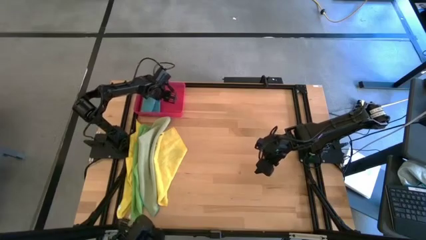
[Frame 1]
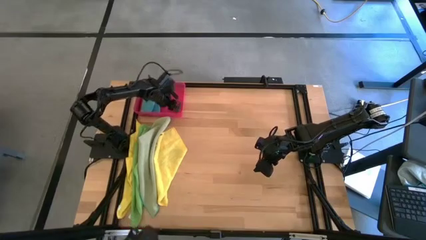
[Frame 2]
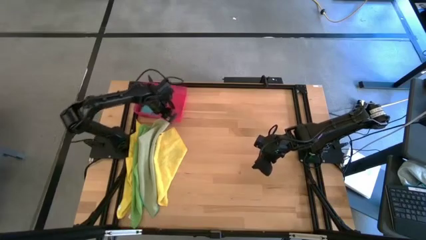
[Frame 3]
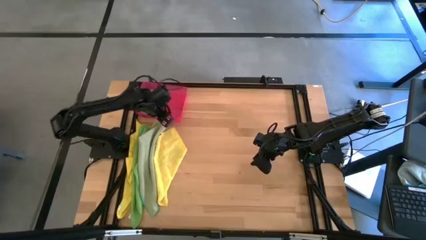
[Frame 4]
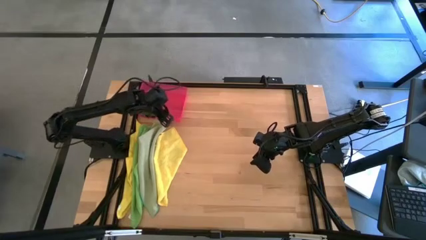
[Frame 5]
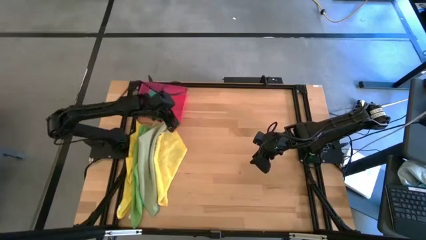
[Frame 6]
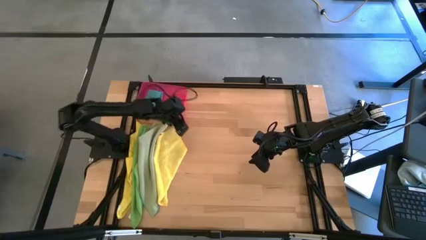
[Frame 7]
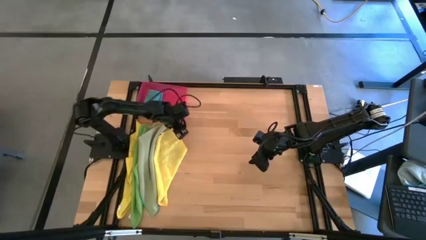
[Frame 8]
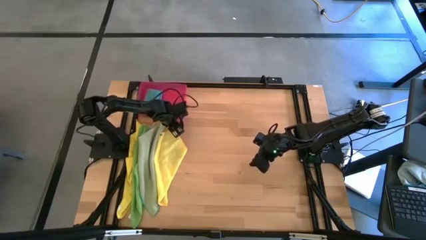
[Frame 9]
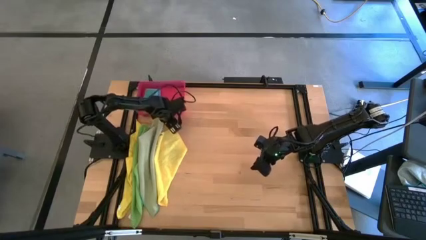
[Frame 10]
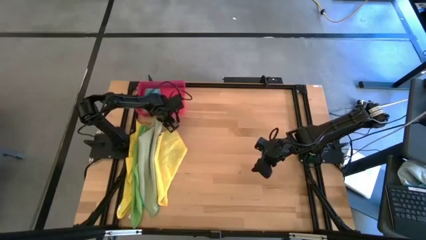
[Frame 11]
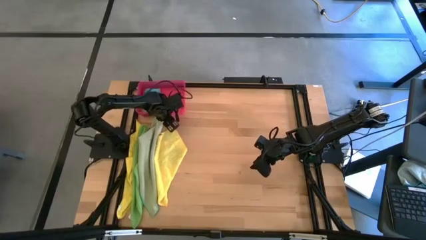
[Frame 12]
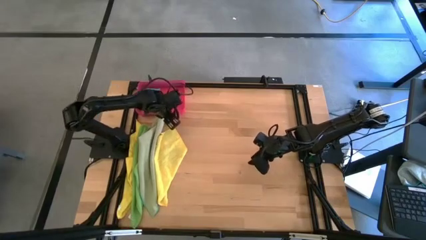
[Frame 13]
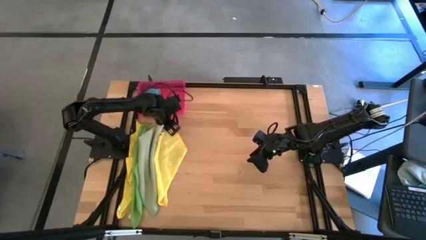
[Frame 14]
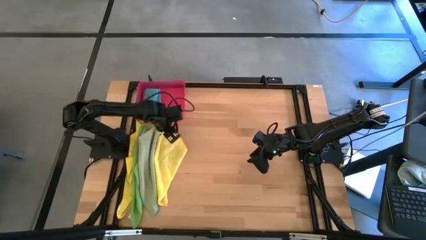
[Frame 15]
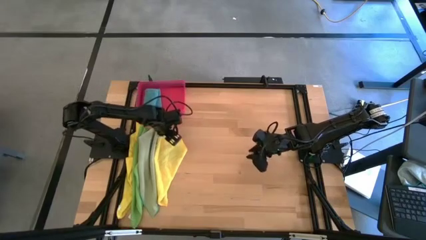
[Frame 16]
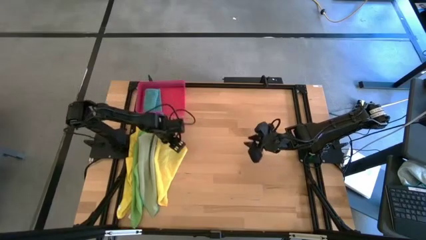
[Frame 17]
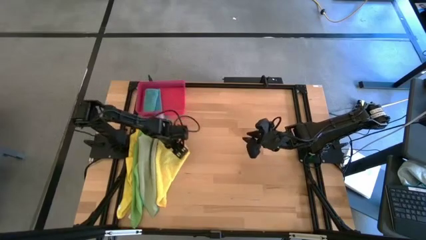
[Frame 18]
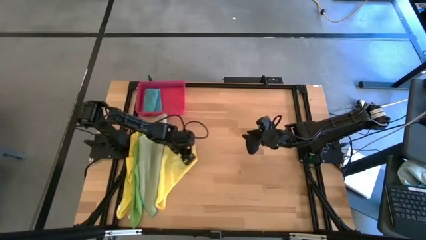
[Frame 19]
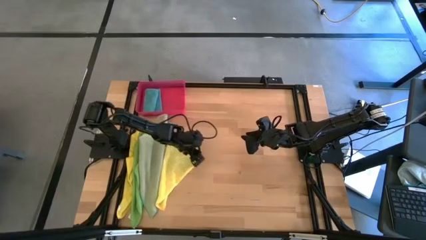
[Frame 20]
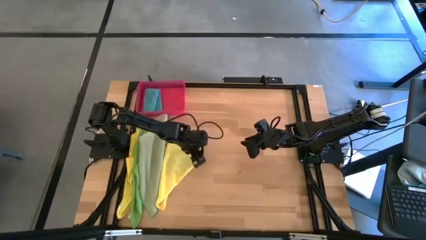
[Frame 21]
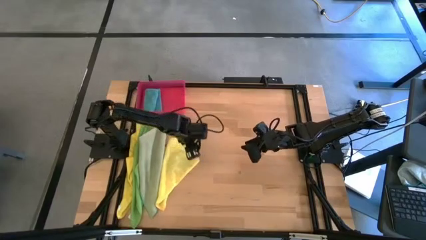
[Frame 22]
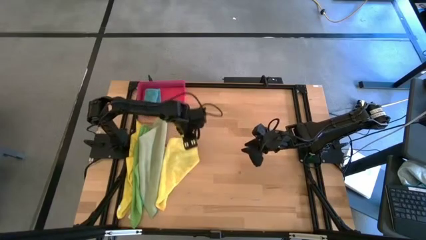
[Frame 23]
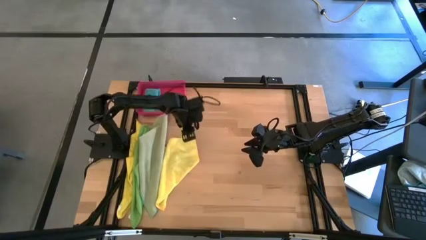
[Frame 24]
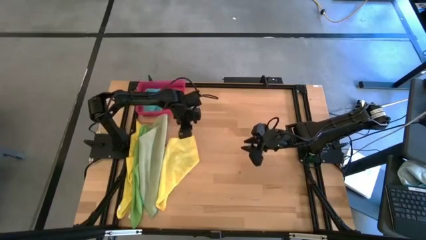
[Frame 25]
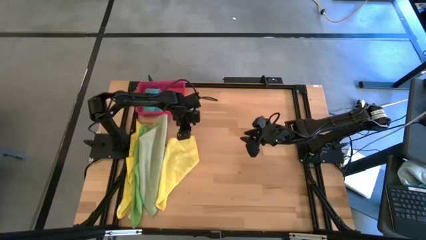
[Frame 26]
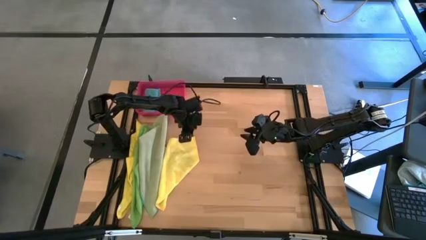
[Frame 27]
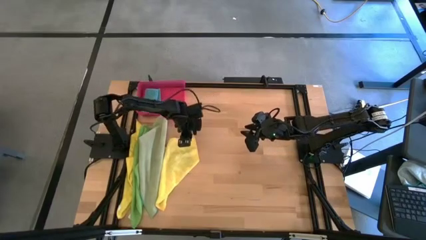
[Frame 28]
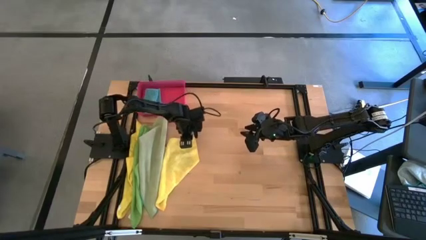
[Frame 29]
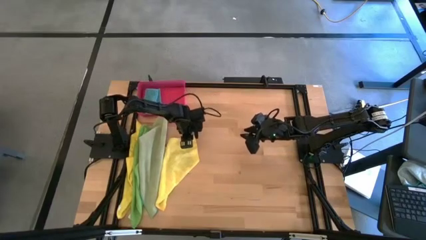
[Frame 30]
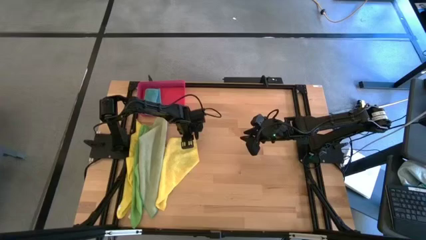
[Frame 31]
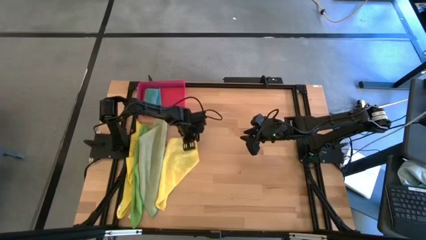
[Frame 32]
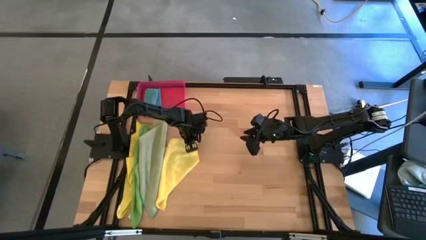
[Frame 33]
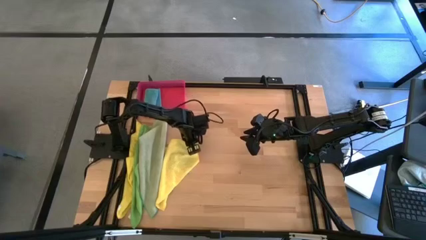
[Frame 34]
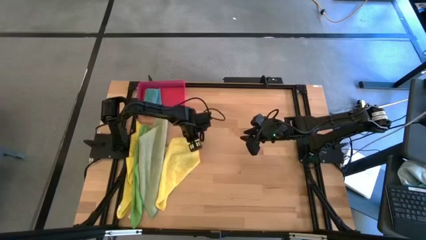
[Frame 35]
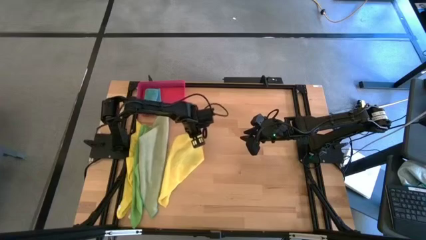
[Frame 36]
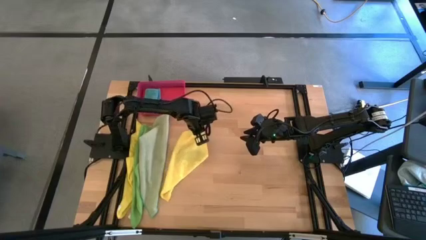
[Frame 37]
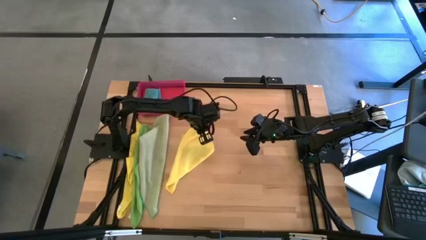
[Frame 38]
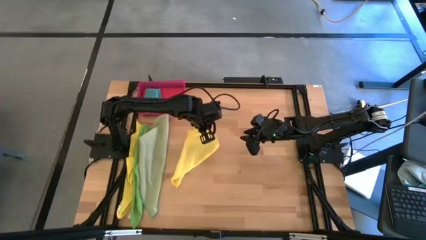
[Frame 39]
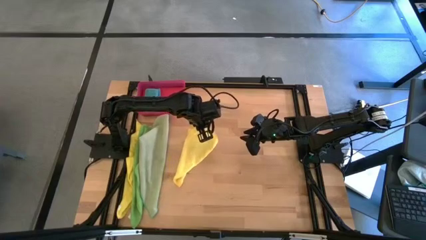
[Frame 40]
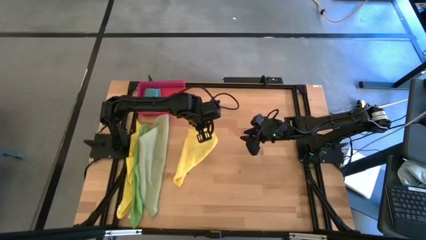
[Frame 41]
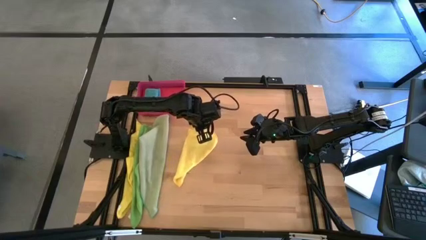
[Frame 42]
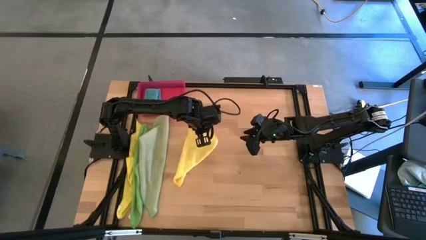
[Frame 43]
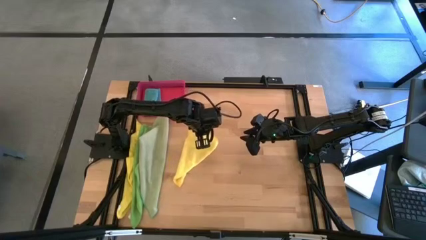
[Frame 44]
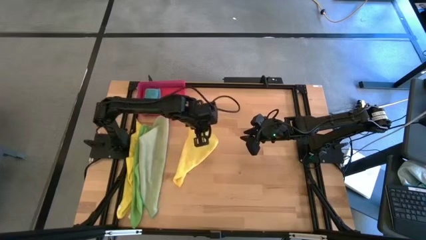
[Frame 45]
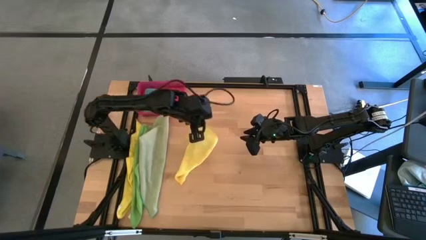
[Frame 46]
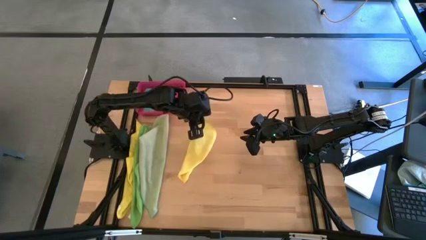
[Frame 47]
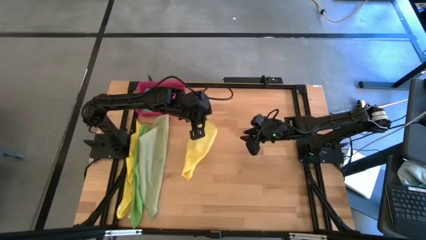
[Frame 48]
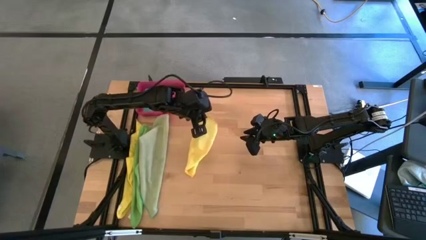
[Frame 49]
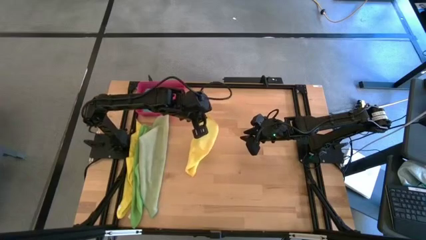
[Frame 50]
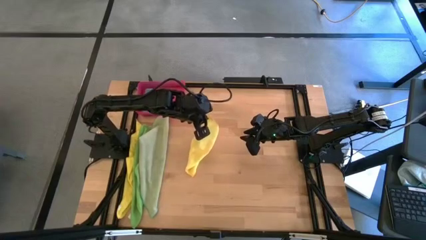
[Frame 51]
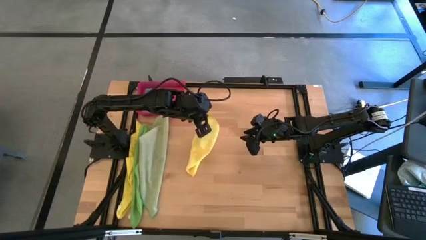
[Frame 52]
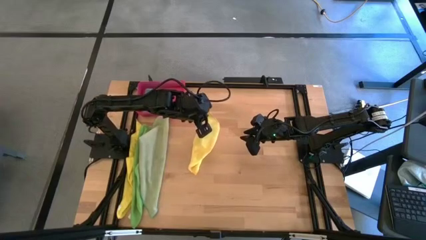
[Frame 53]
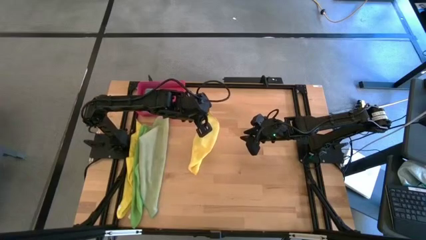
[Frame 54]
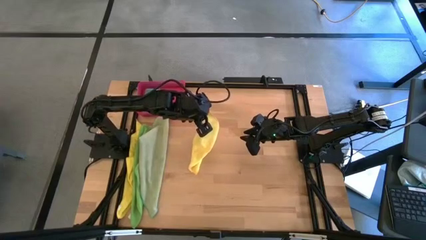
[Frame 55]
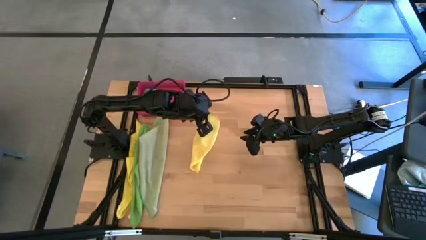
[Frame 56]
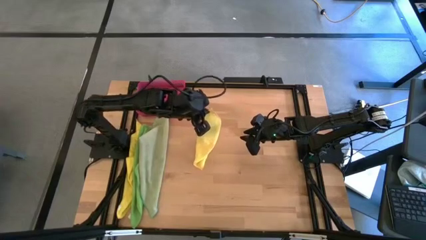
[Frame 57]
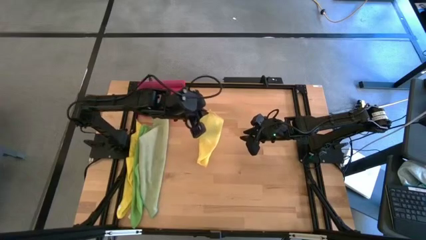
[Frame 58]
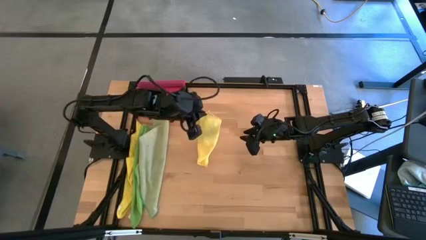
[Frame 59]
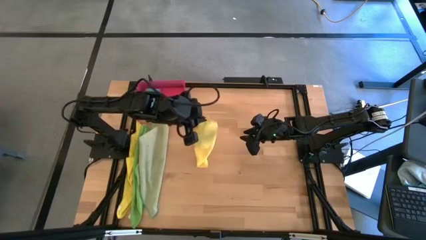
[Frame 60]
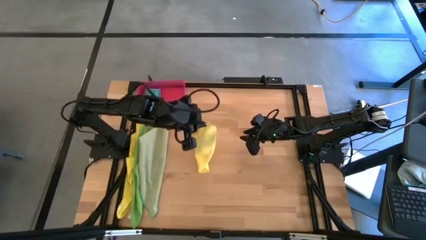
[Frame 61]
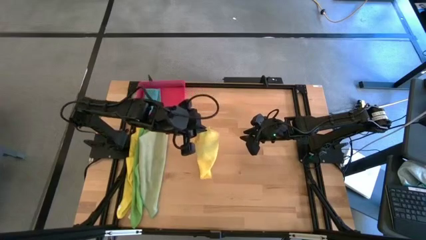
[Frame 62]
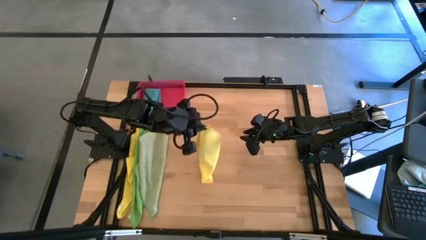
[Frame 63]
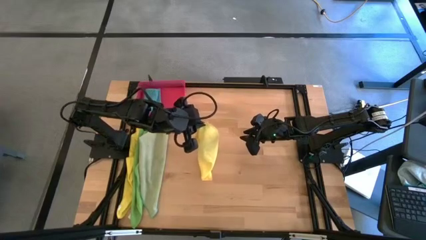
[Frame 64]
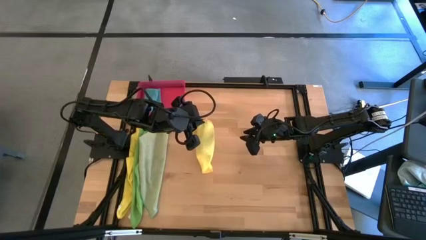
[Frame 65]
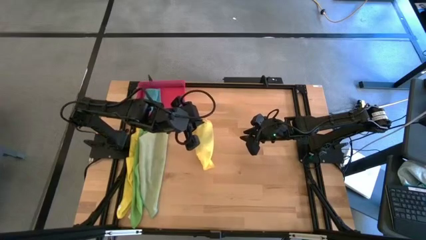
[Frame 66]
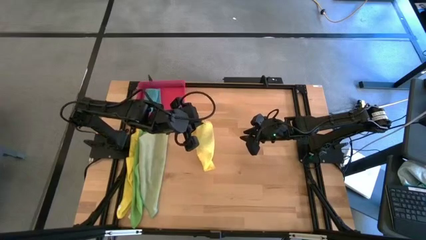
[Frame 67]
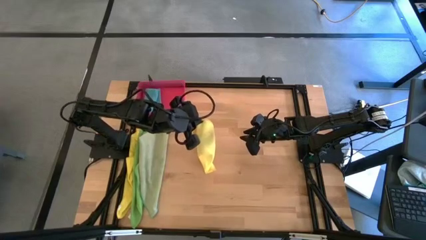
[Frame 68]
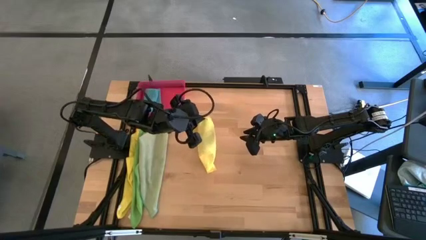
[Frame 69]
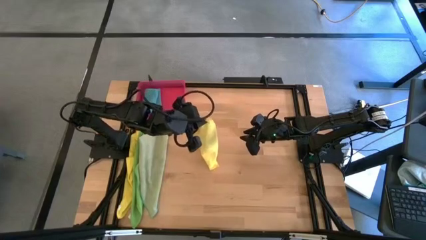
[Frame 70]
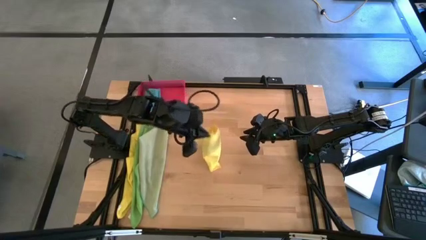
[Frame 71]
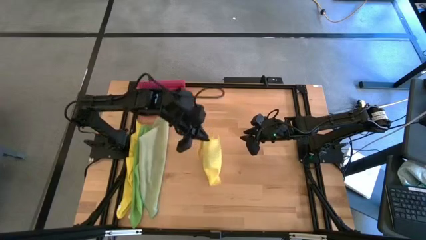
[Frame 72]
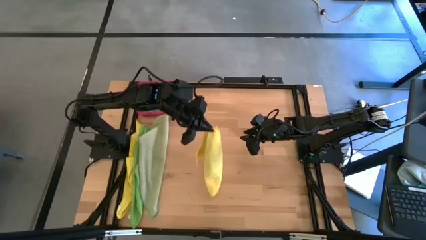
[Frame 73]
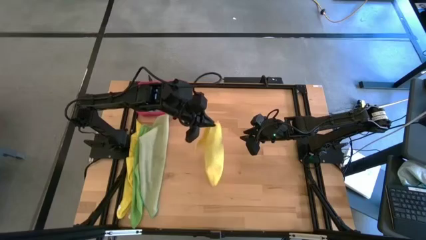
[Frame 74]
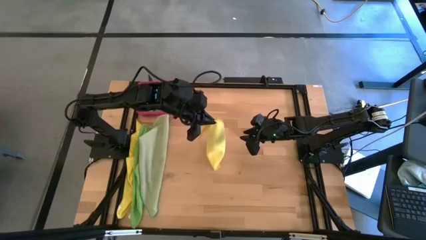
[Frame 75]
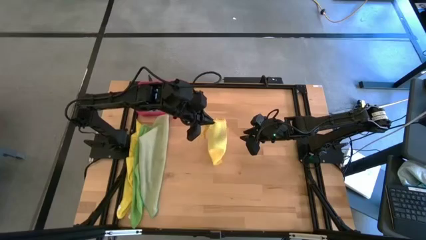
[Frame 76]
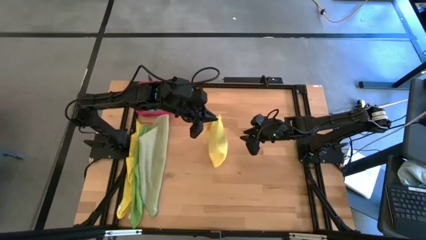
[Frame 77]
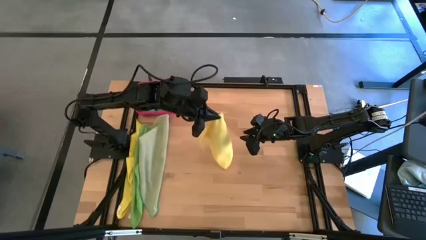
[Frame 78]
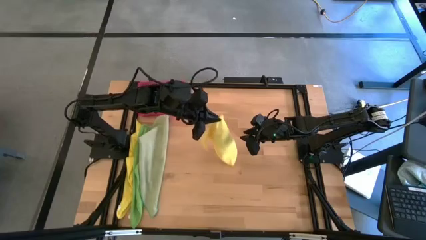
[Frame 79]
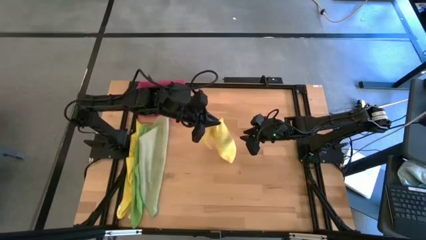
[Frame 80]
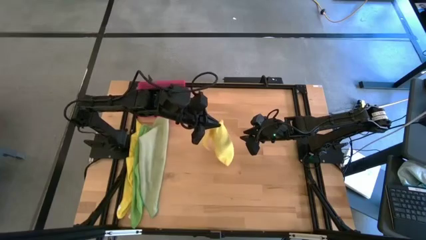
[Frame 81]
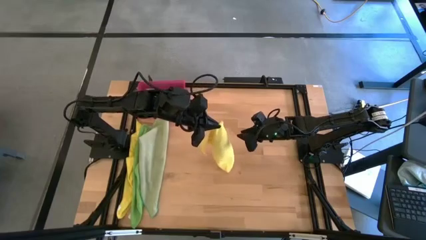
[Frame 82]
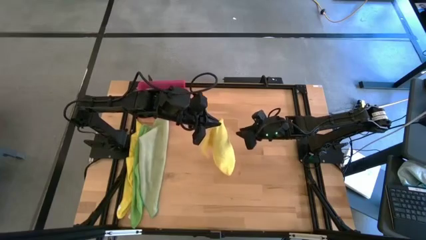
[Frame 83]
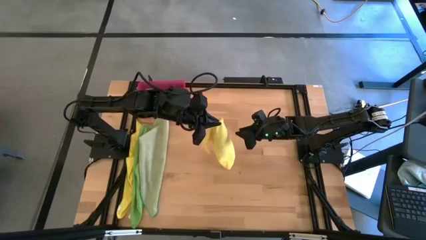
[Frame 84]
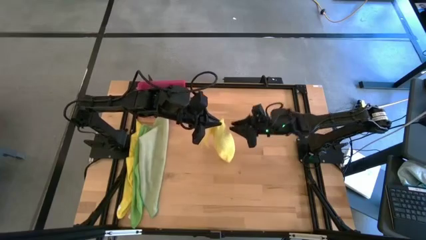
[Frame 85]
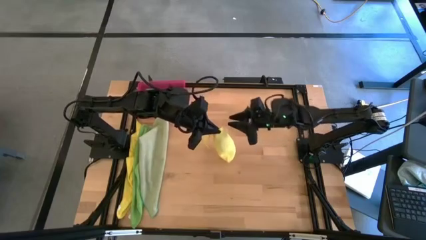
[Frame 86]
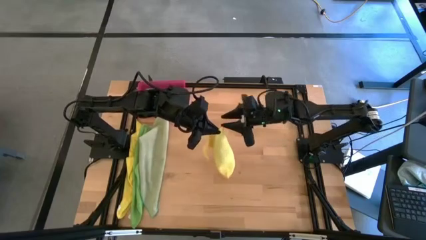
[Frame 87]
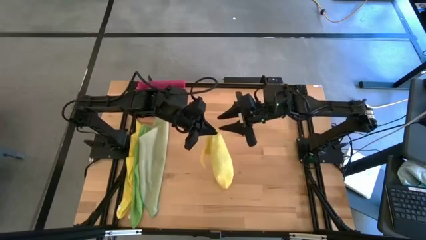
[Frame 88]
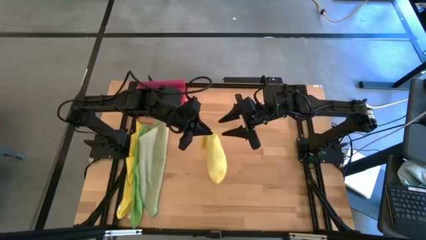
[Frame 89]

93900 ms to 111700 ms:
Task: Fold microfiber towels
Fold the right yellow microfiber towel on the table
